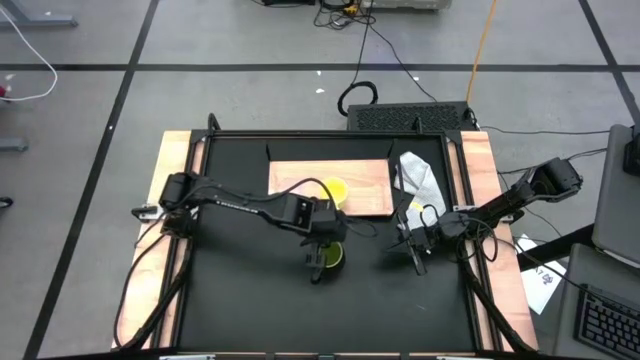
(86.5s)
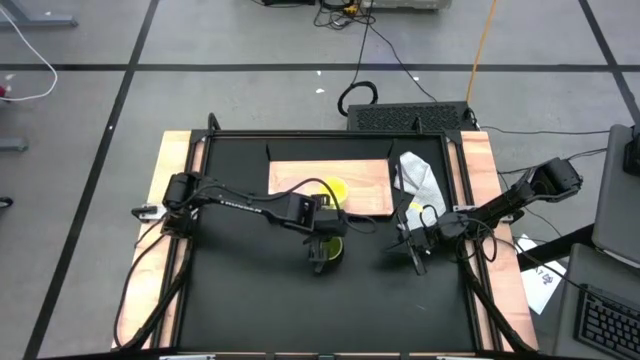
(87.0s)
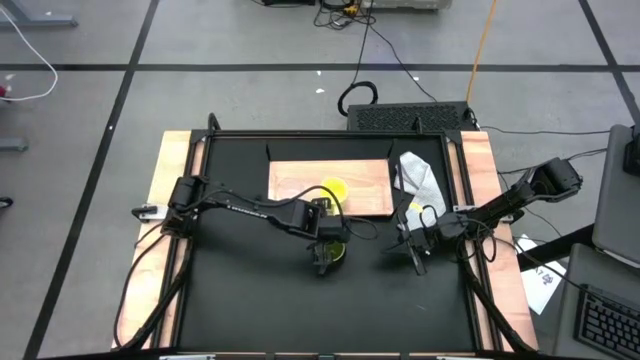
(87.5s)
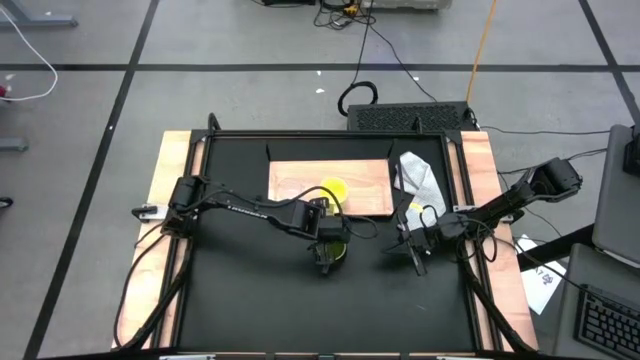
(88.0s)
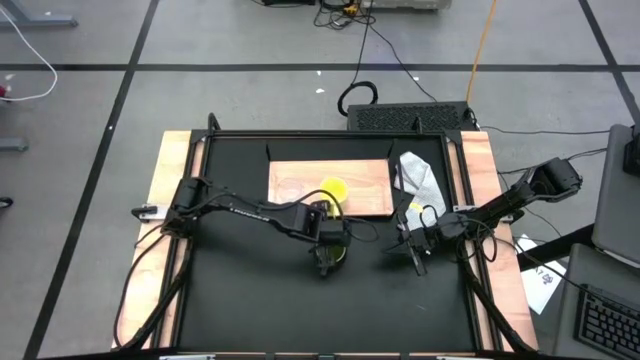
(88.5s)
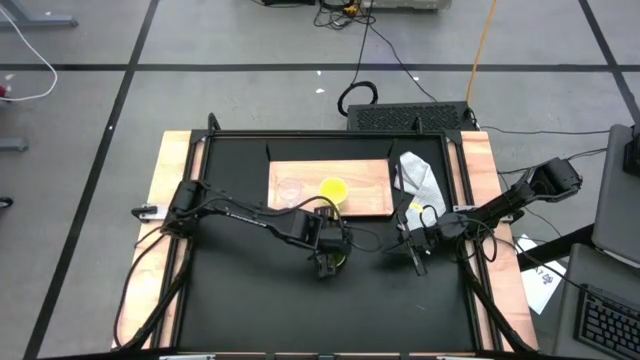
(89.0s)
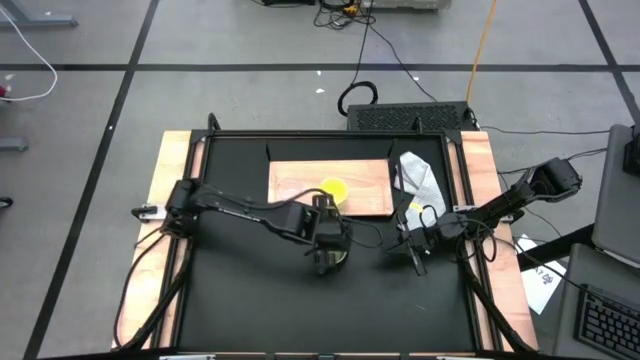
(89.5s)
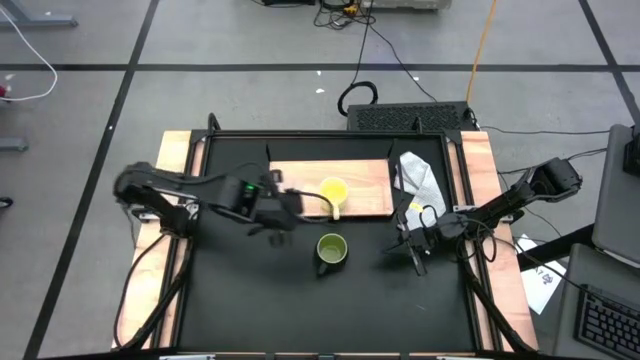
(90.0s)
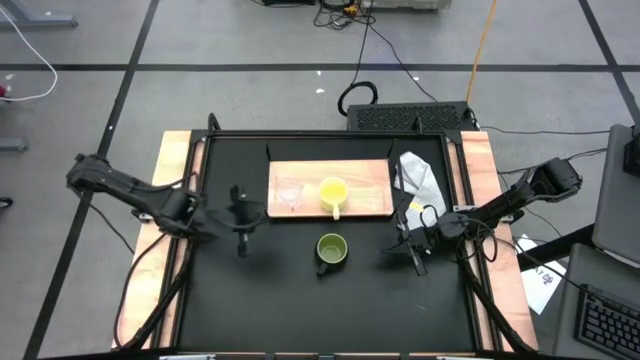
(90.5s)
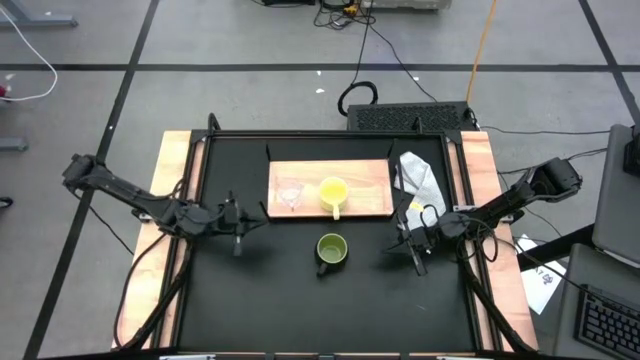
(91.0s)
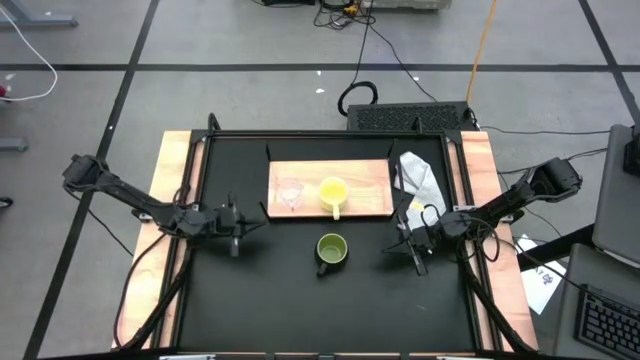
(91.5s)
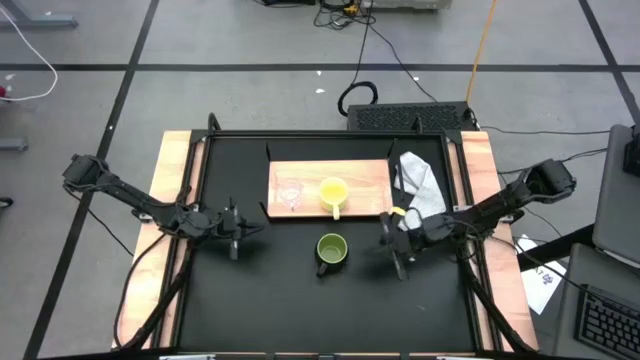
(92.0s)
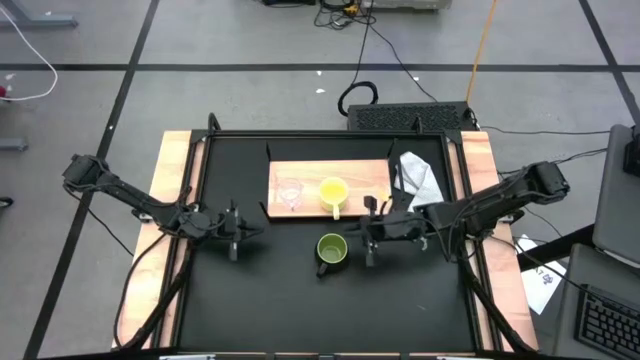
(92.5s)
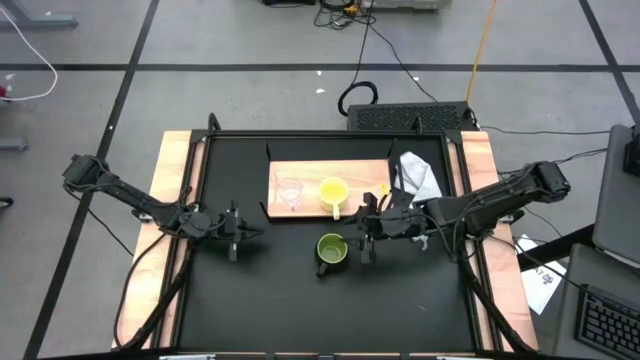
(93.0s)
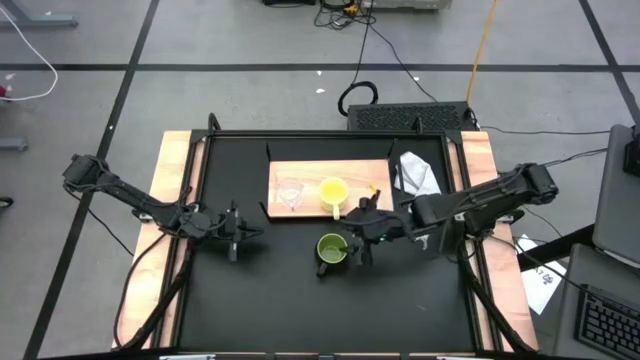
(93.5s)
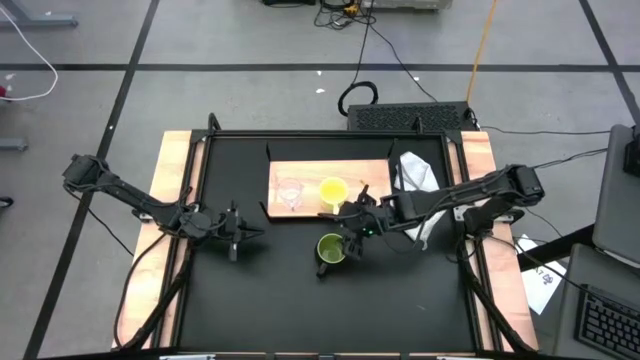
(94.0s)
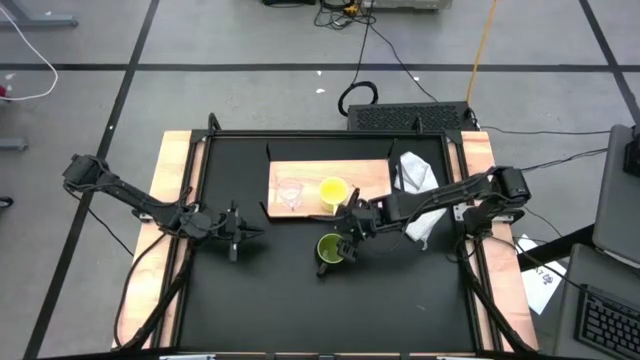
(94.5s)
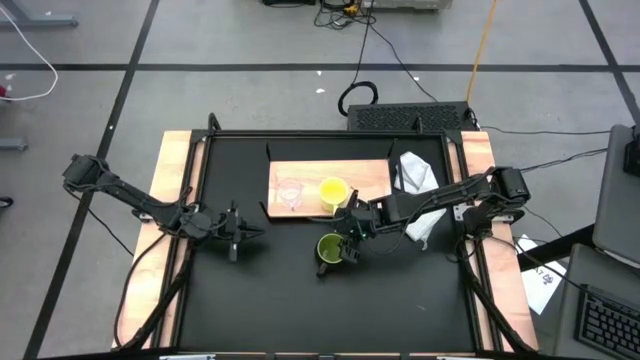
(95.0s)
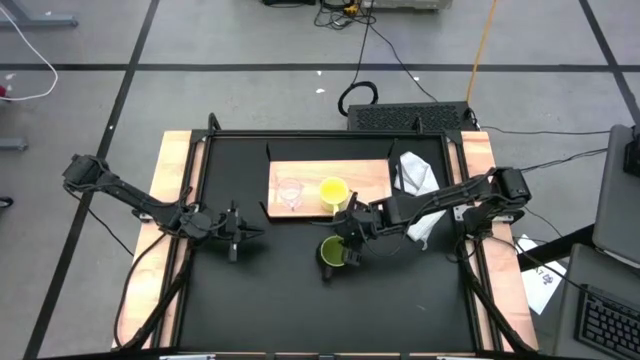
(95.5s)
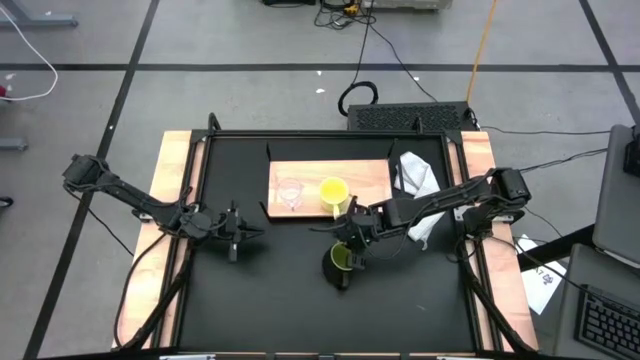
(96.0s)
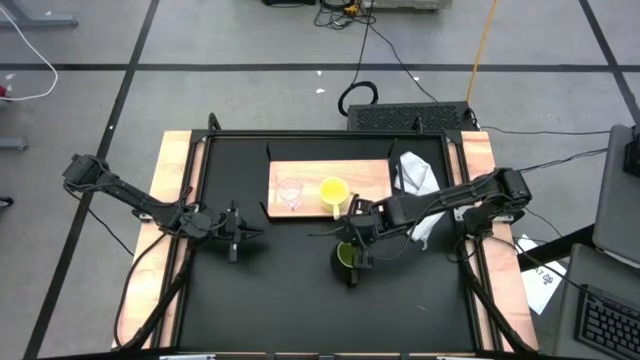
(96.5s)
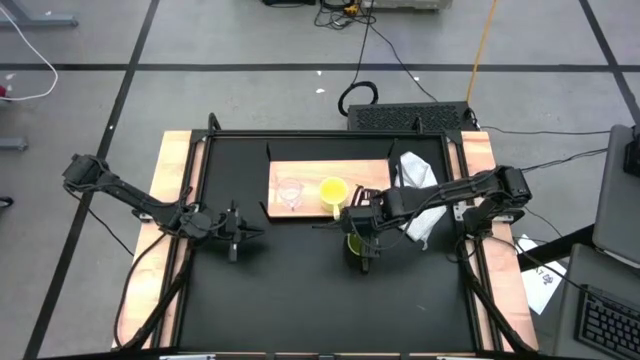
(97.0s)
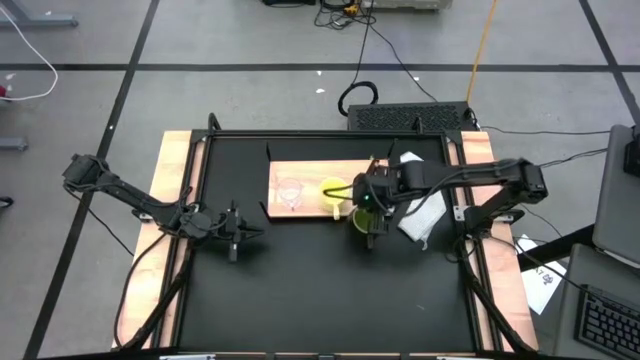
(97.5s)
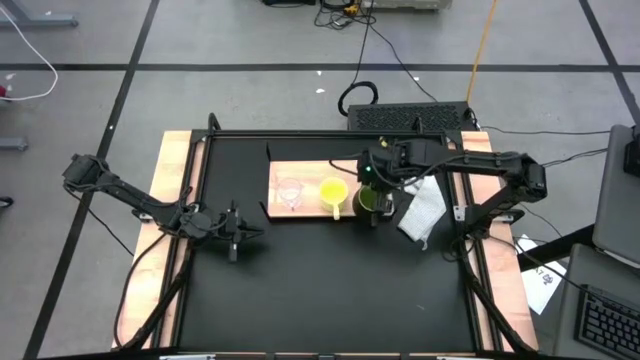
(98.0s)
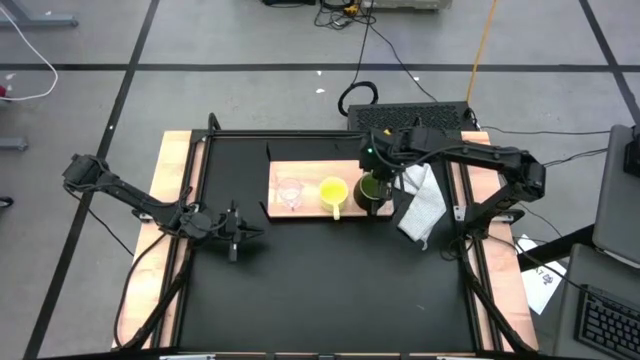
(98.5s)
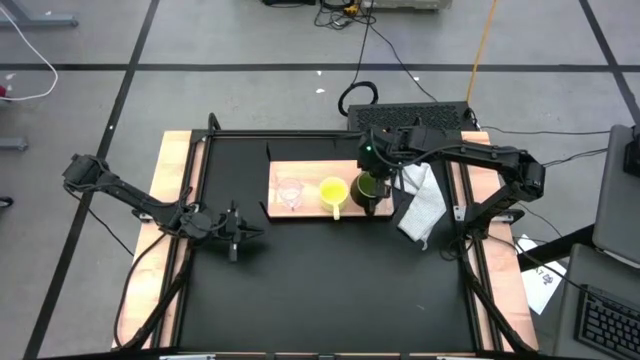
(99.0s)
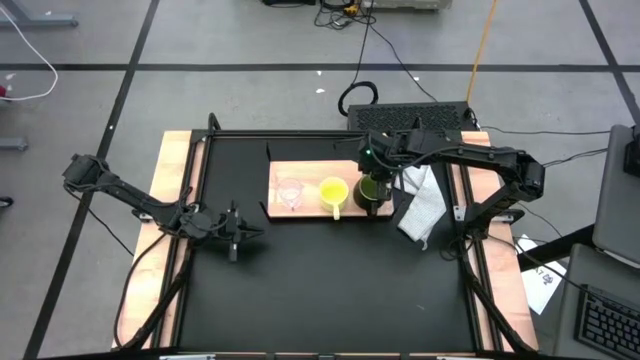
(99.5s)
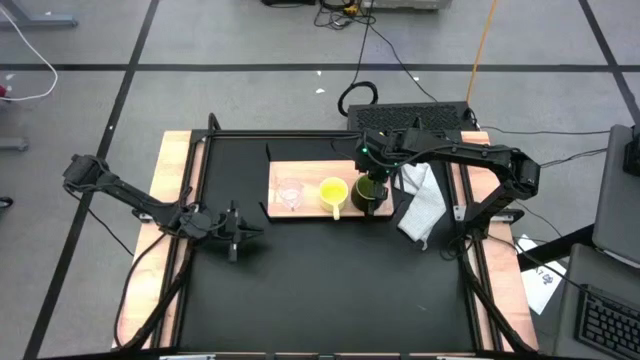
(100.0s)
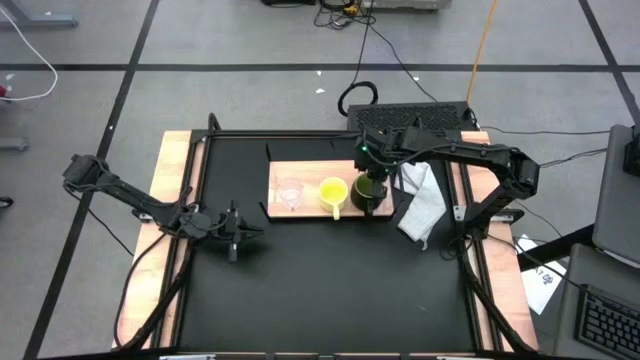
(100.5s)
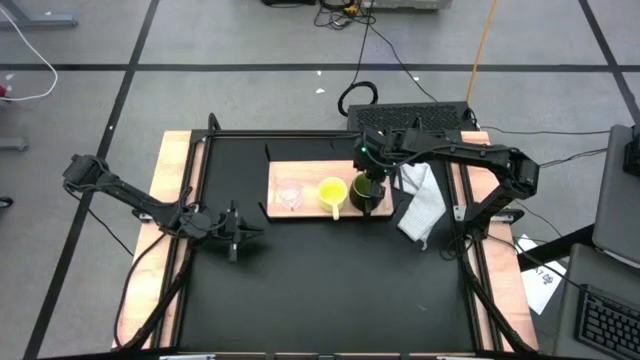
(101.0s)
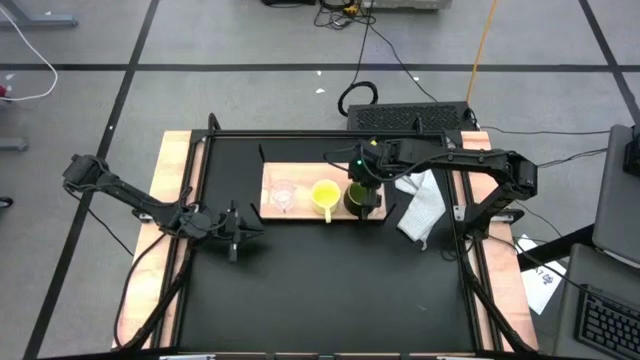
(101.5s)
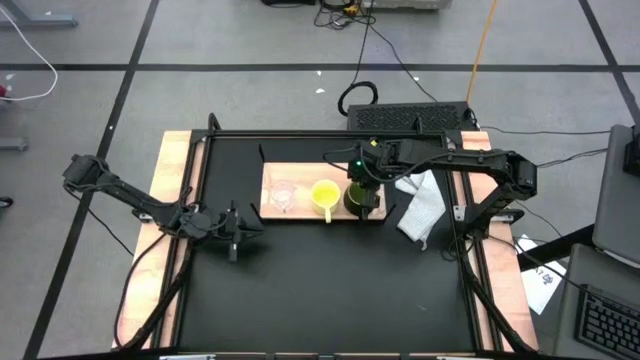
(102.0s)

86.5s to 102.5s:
Task: Stack small to large cups/mugs on shelf
Put the black mug on the shelf

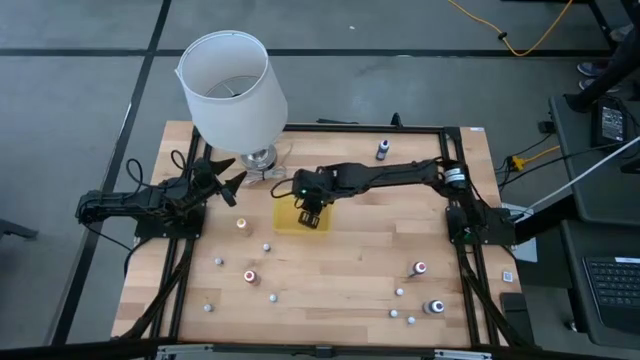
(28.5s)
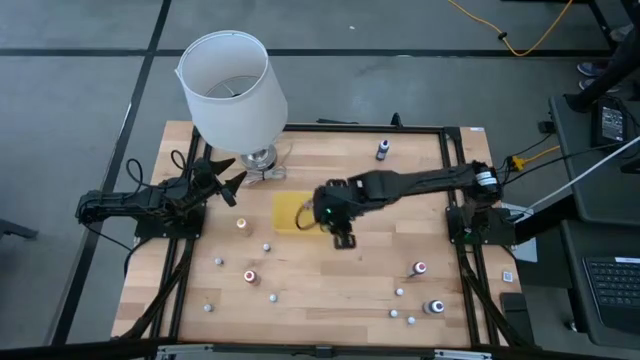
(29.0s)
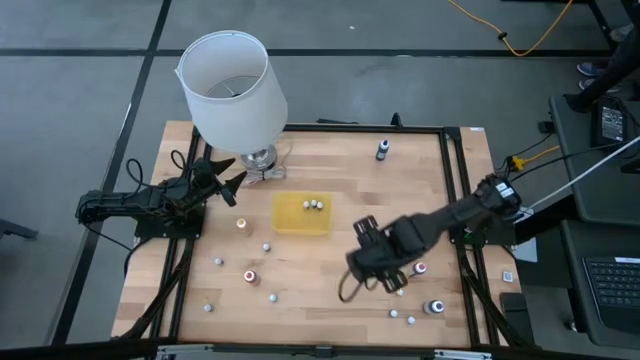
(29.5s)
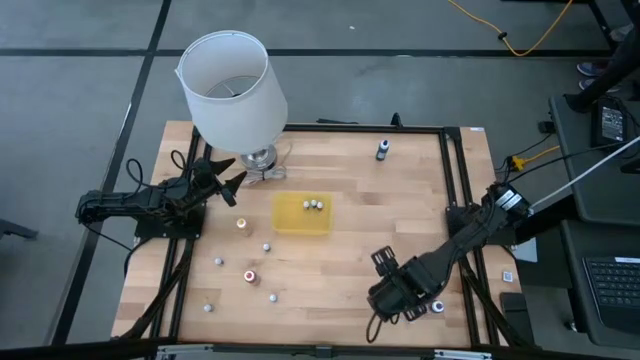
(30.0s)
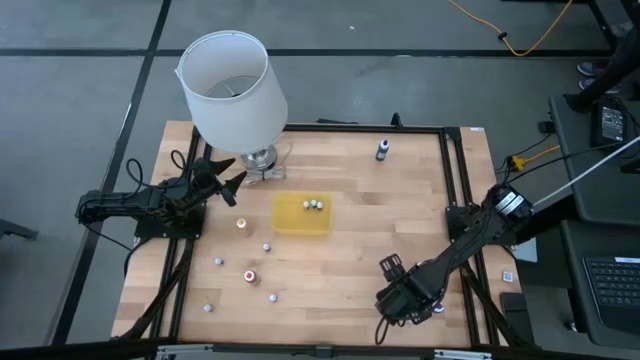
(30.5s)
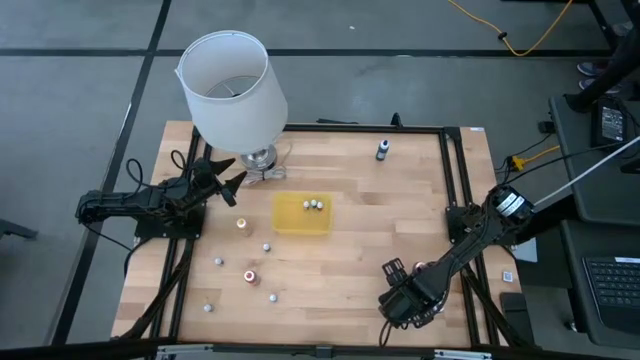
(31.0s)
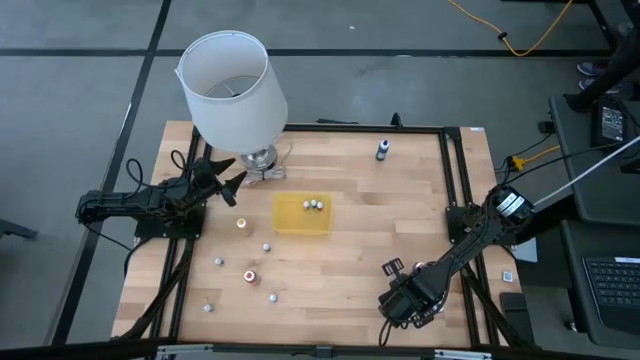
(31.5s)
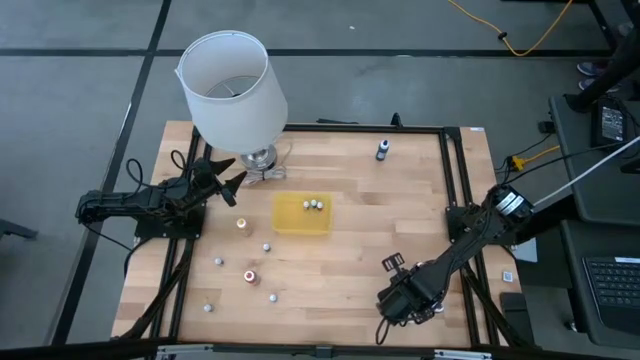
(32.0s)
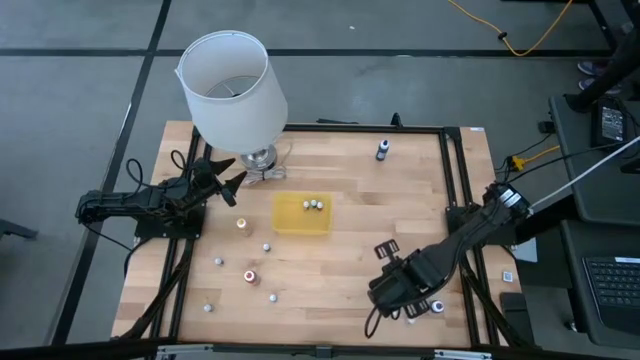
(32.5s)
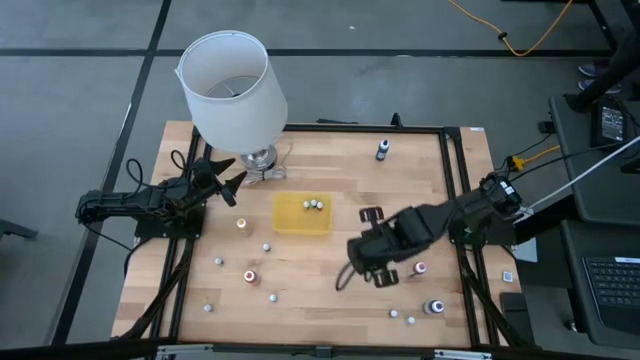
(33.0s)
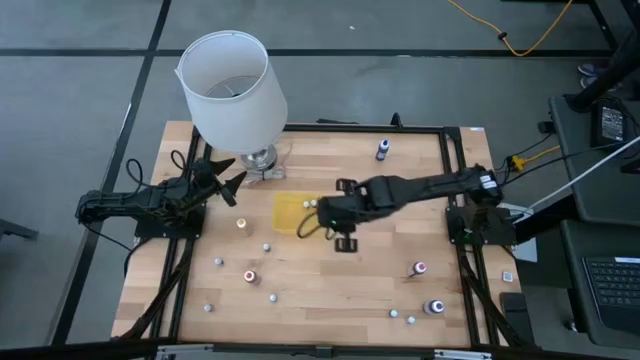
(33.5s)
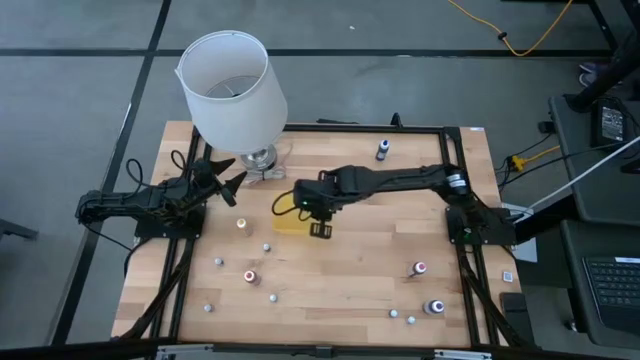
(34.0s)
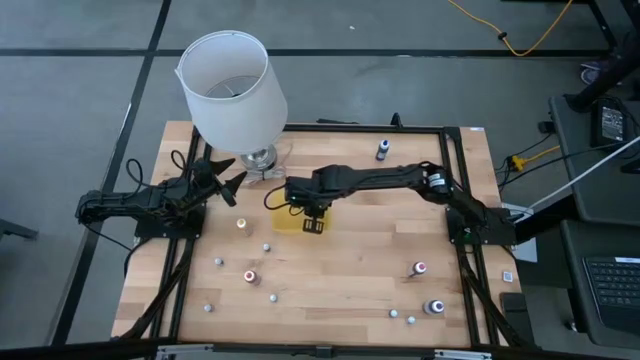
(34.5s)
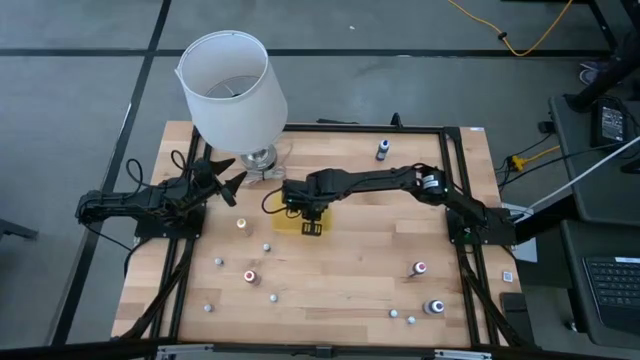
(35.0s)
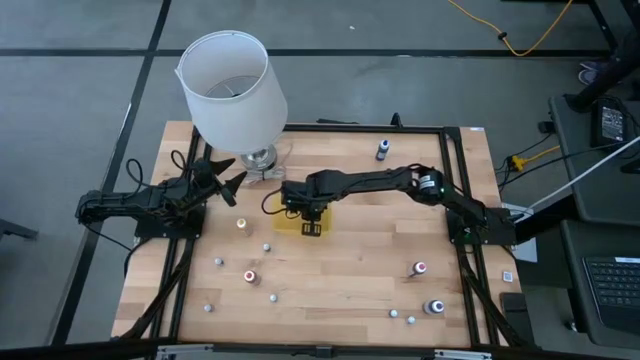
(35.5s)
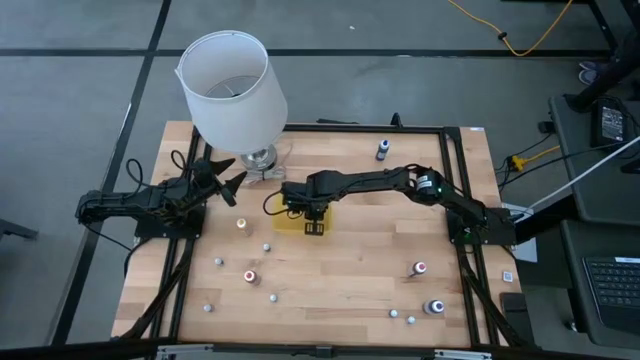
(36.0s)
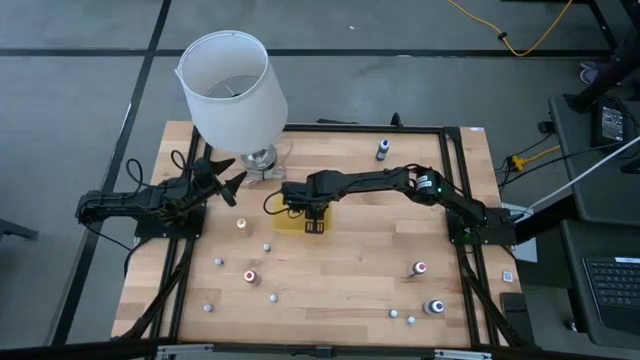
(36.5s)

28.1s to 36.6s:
Task: Pick & Place food coloring
Put the red food coloring bottle into the yellow bin
